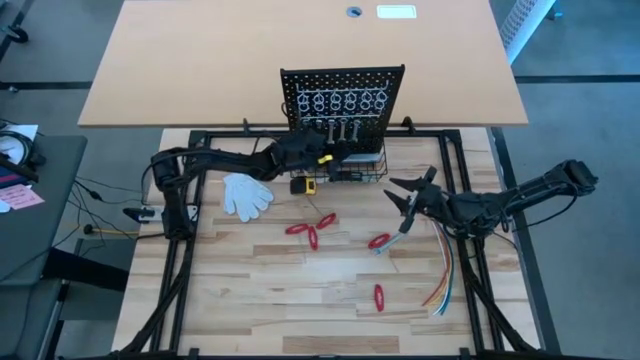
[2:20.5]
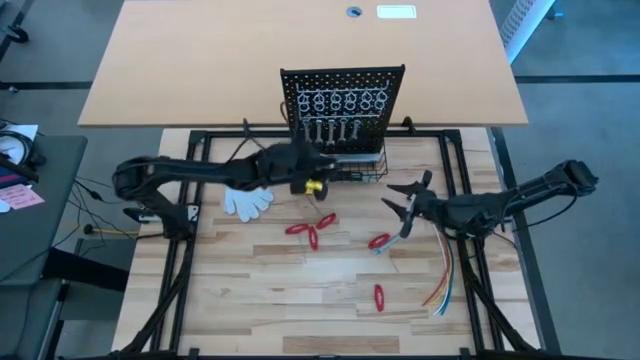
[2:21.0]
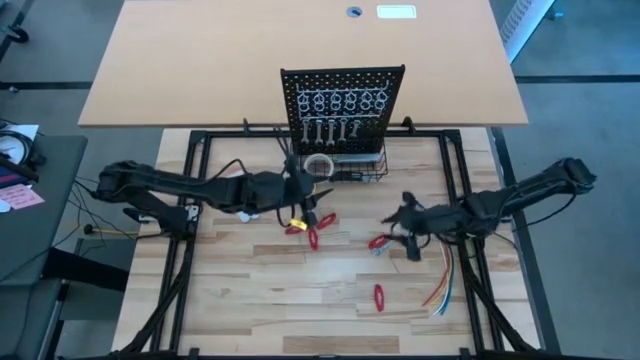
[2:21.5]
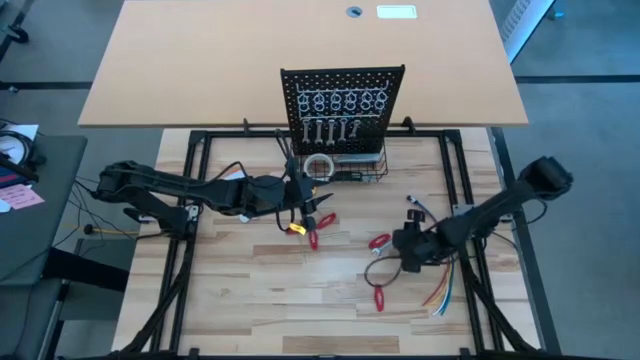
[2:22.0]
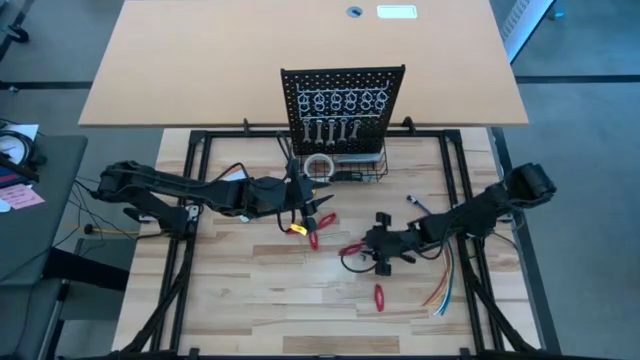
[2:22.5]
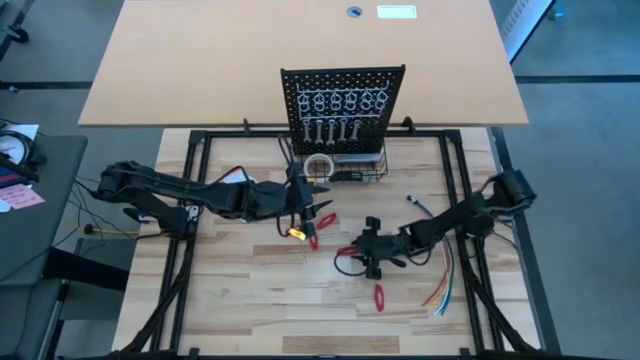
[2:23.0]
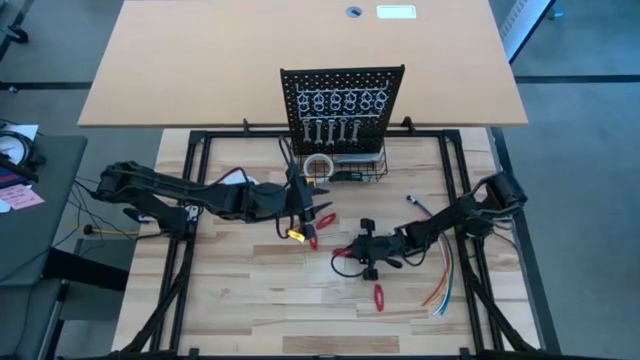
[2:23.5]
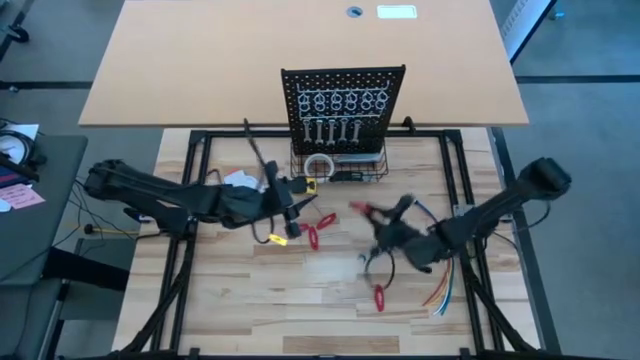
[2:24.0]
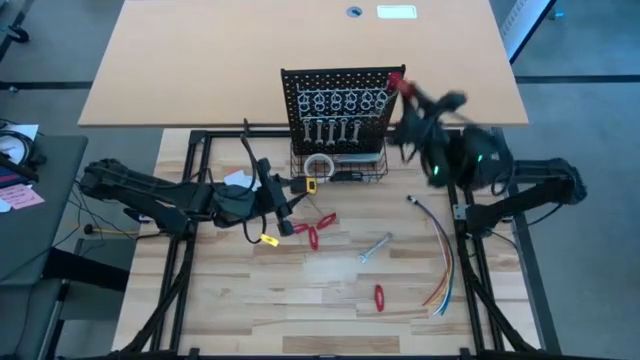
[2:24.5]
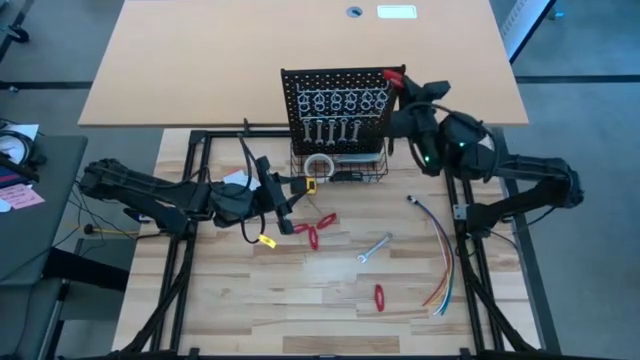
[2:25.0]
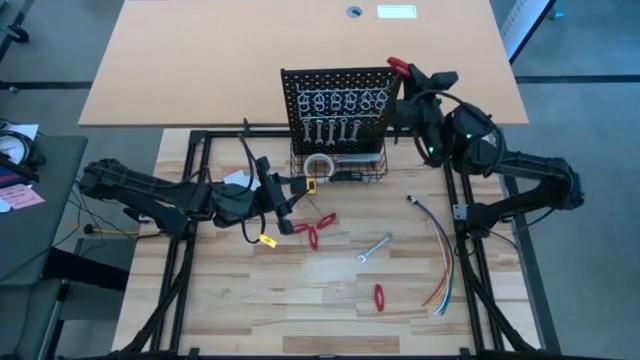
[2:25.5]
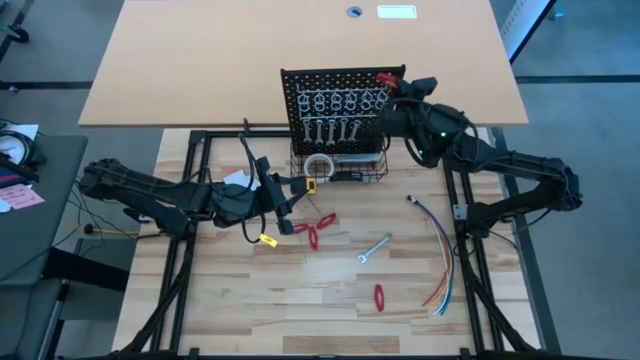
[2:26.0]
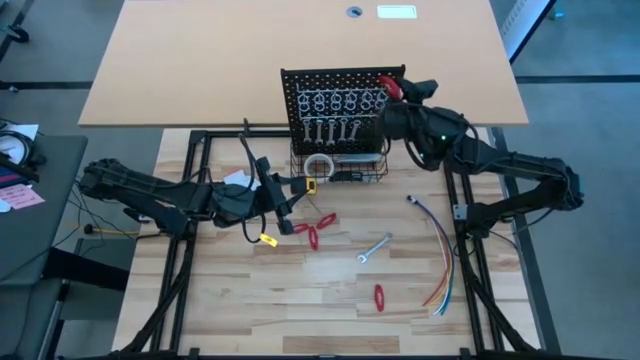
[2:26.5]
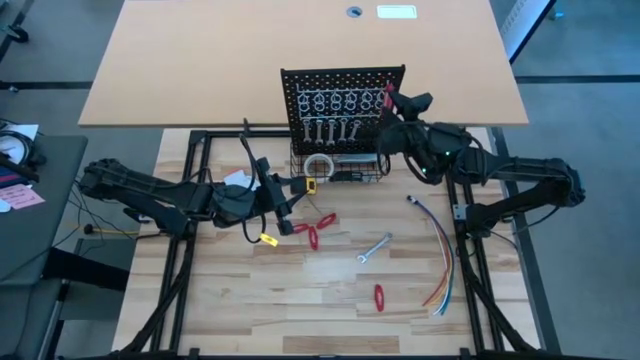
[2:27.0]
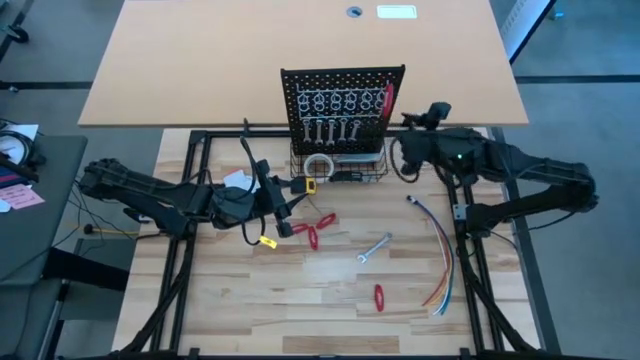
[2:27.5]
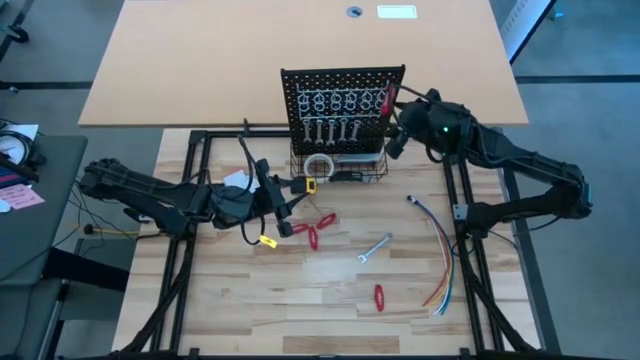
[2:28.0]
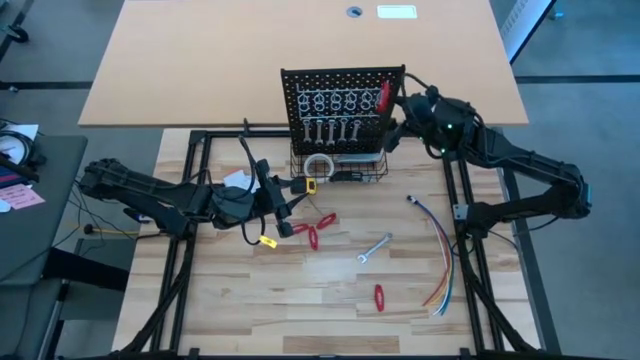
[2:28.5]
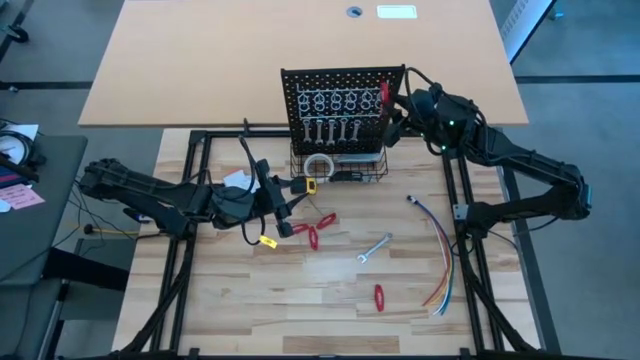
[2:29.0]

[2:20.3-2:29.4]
Task: Hang tools onto peg board
Hang the red allen wrench on the peg board

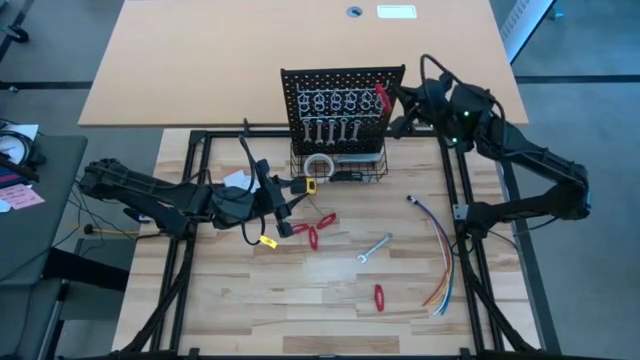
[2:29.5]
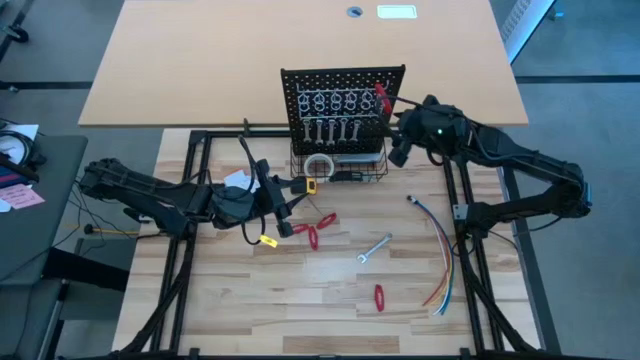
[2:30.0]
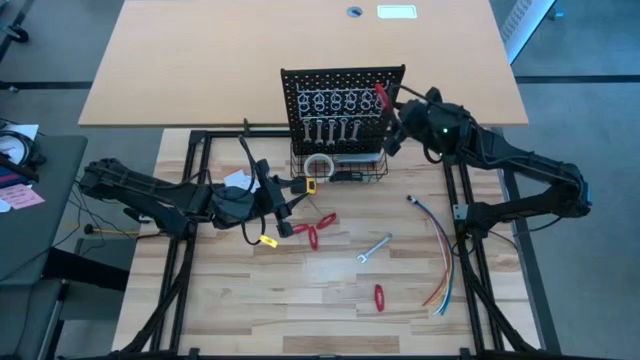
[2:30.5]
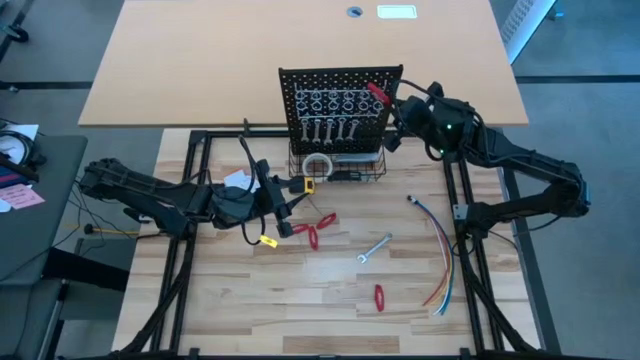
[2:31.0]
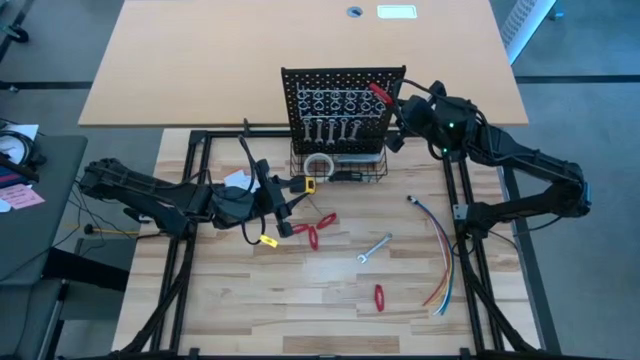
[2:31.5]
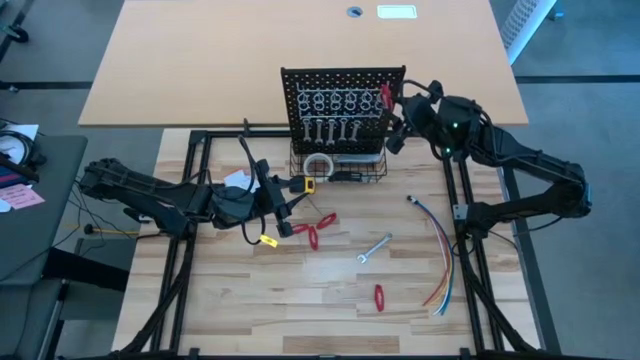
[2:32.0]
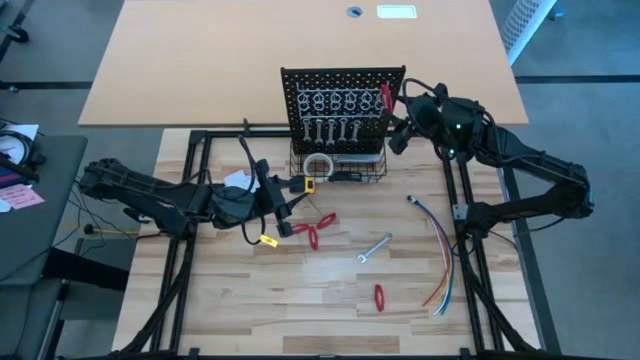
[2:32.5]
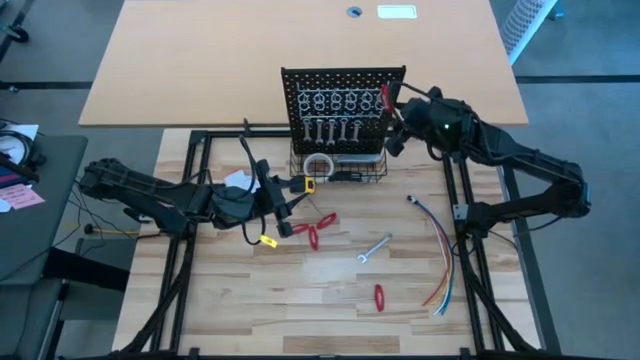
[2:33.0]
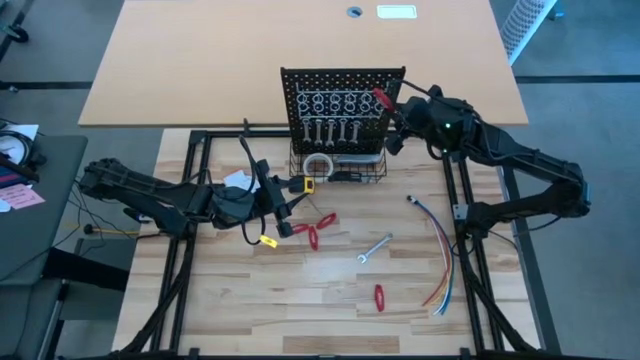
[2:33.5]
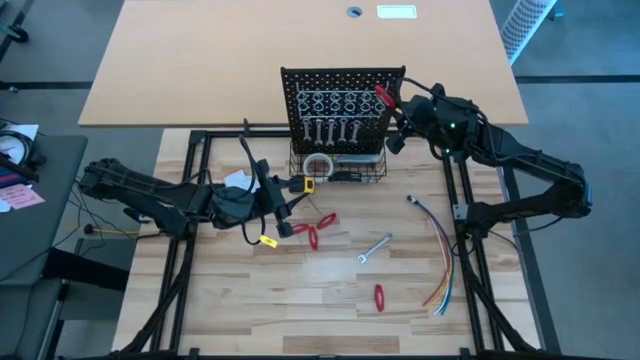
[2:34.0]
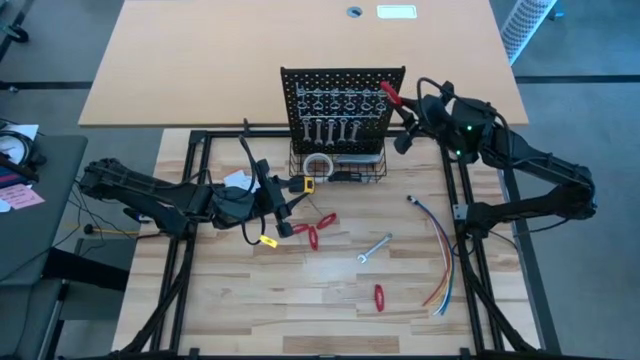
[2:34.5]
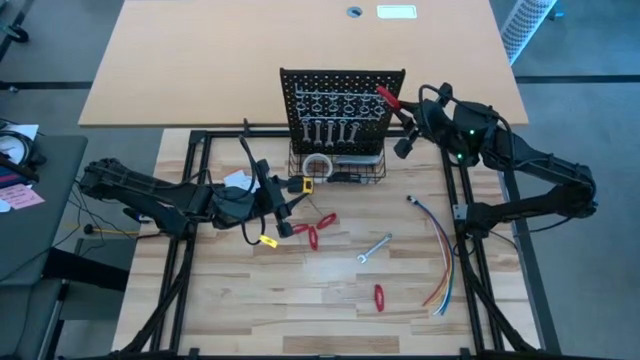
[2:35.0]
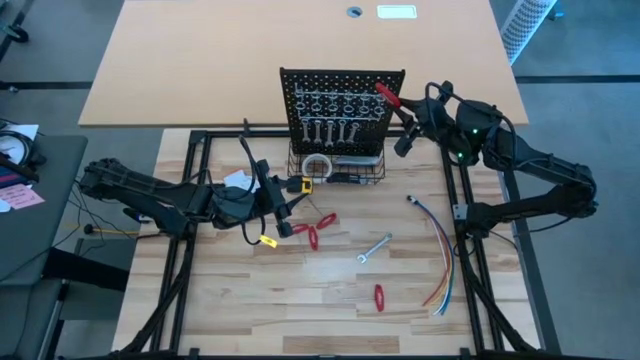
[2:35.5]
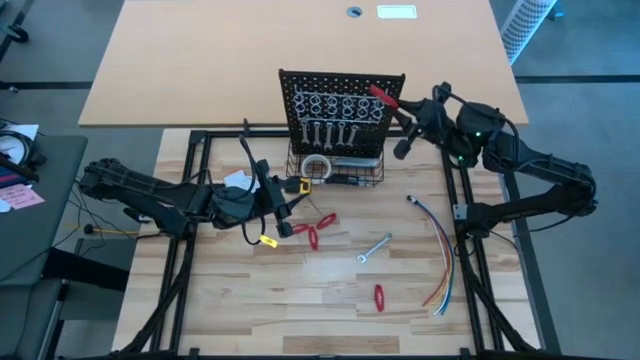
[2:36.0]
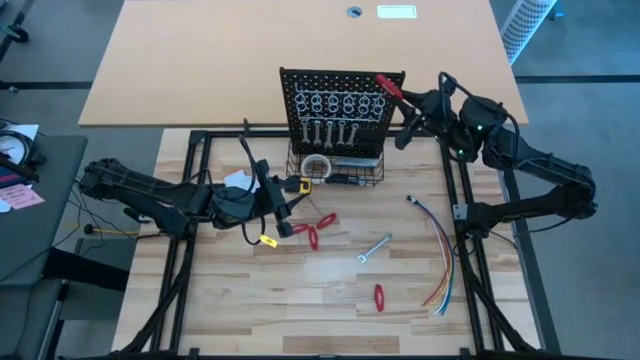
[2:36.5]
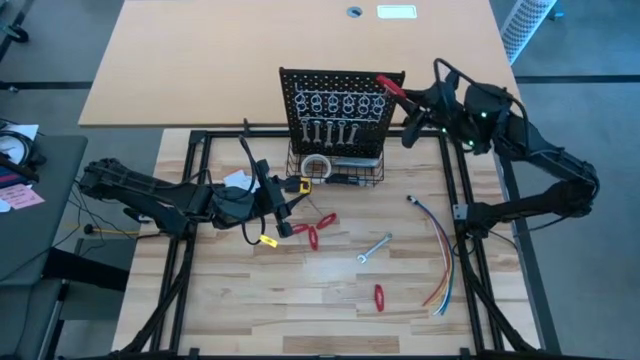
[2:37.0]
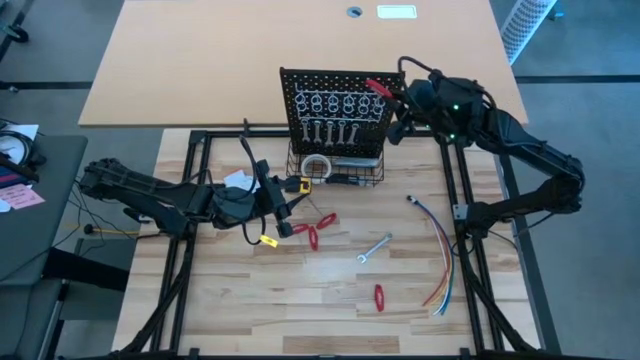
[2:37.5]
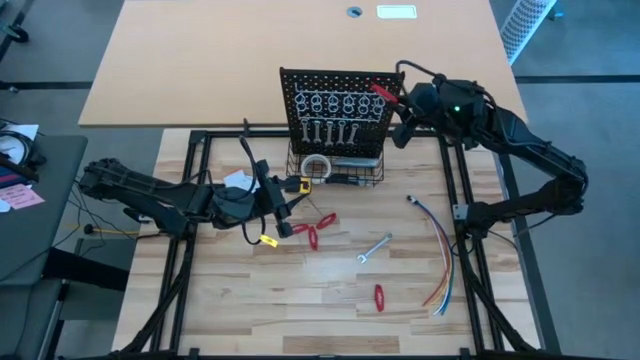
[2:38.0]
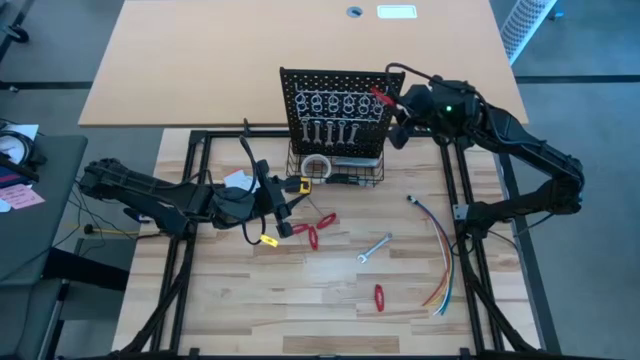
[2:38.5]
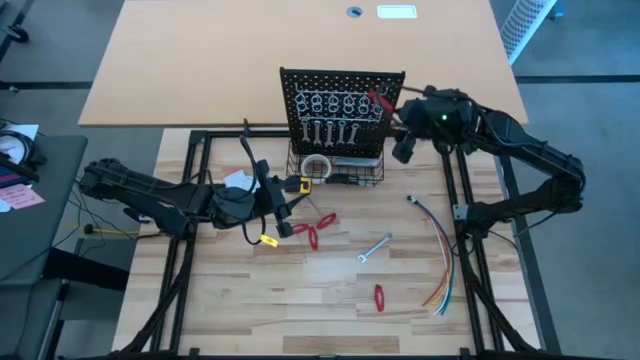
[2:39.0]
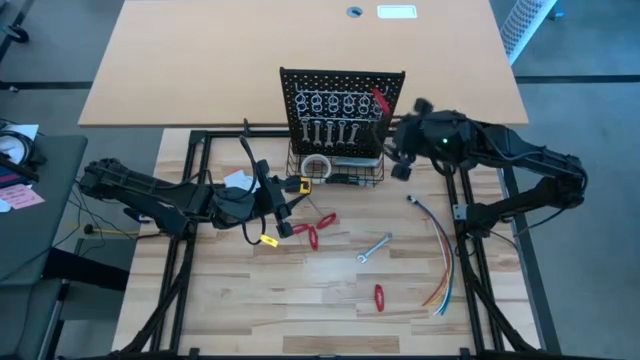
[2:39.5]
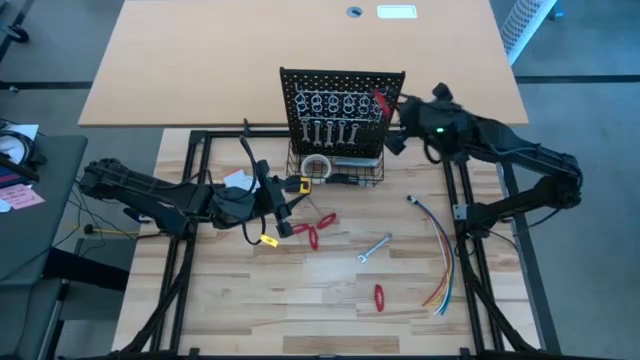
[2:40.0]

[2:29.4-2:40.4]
Hang the red allen wrench on the peg board

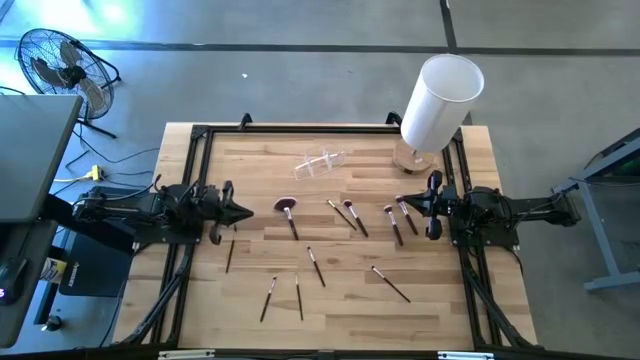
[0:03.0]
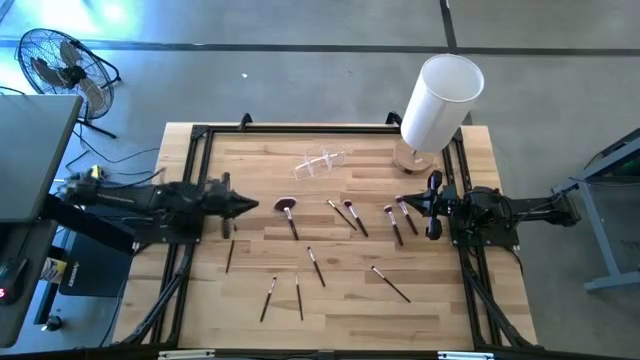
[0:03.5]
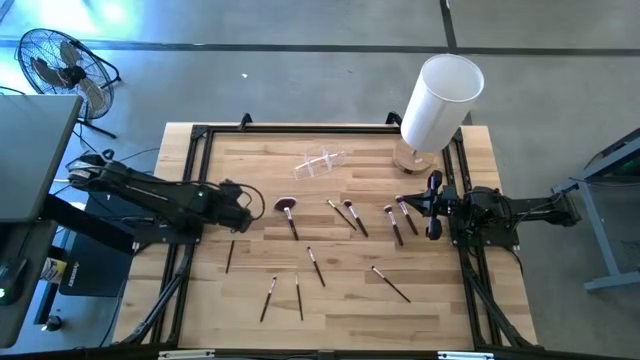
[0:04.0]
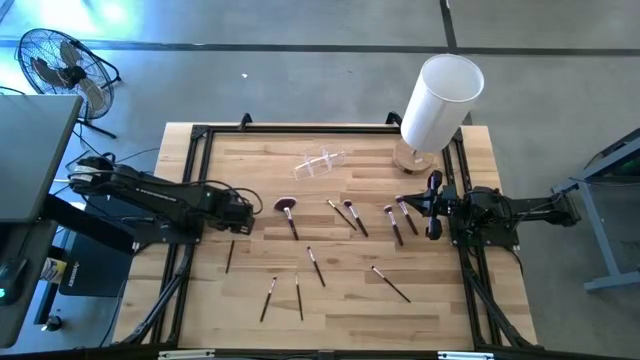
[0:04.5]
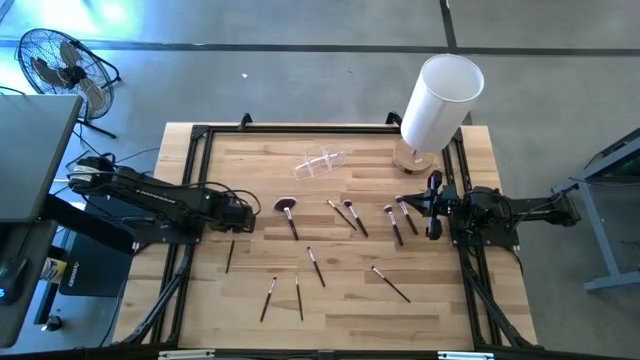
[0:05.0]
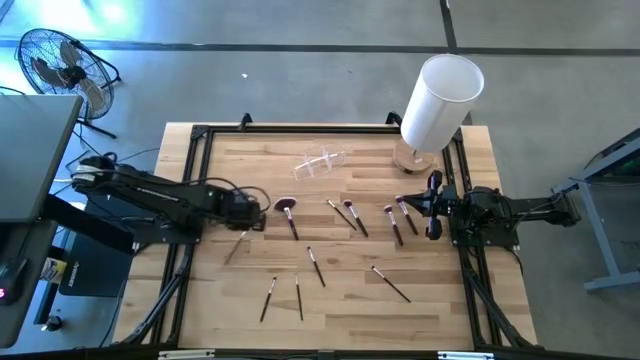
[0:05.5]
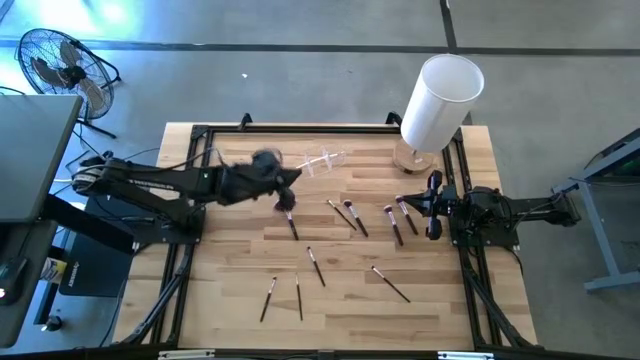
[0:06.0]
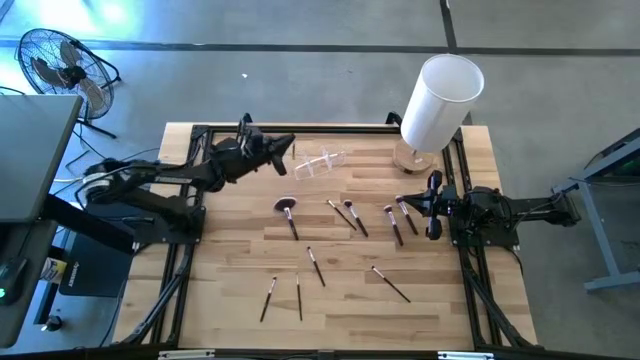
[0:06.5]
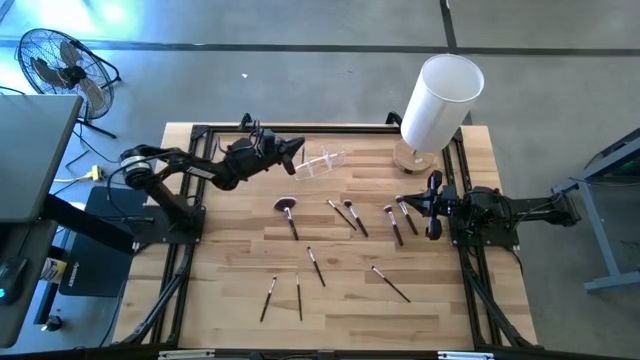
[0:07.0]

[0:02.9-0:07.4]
Task: Put items in baskets/containers
Put the black brow brush into the transparent organizer
